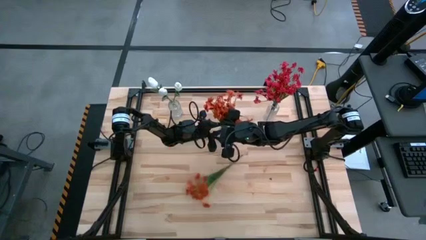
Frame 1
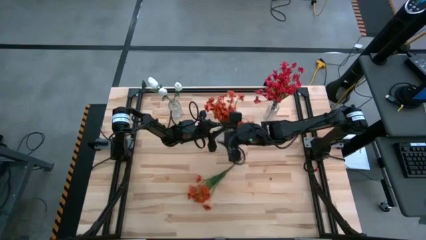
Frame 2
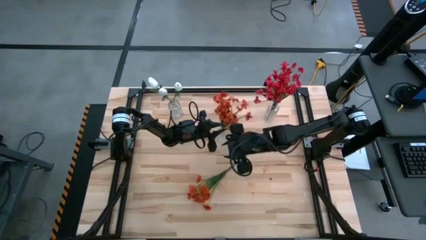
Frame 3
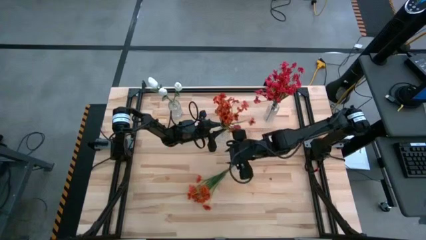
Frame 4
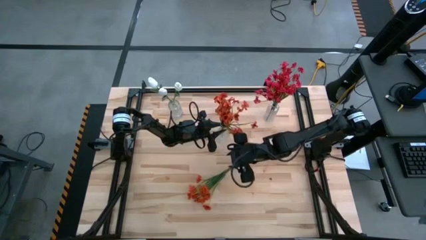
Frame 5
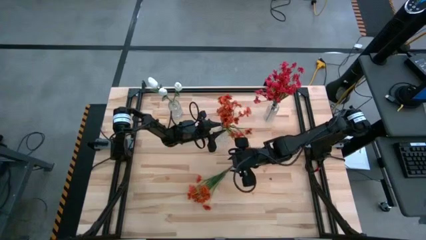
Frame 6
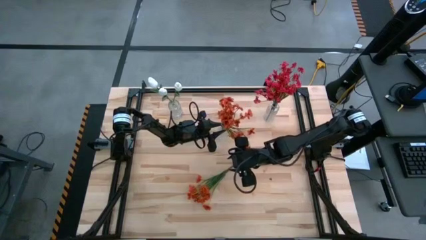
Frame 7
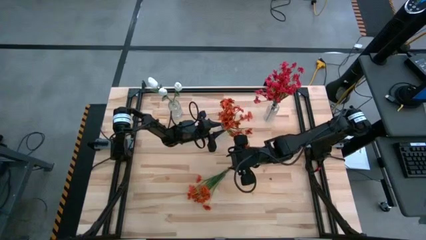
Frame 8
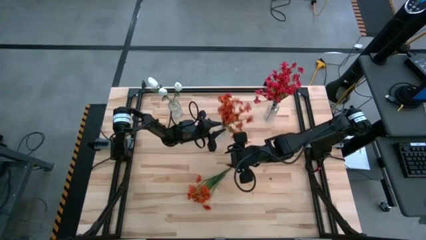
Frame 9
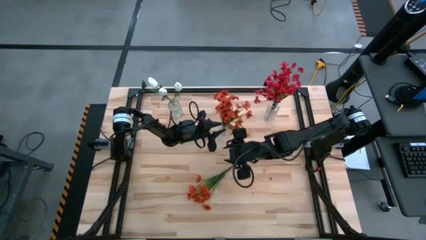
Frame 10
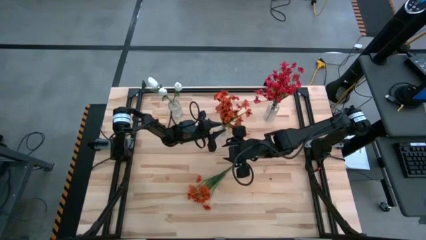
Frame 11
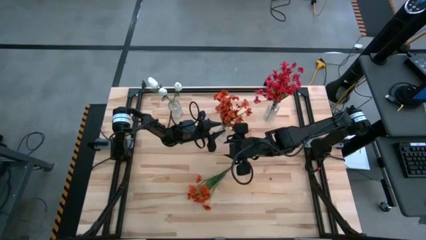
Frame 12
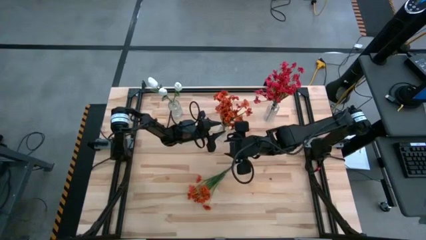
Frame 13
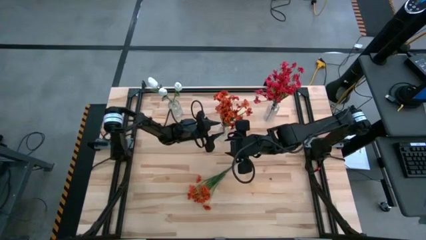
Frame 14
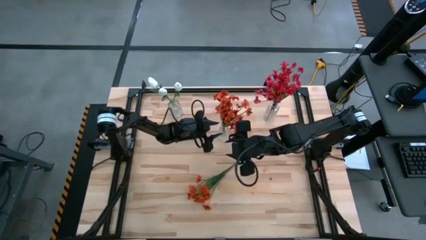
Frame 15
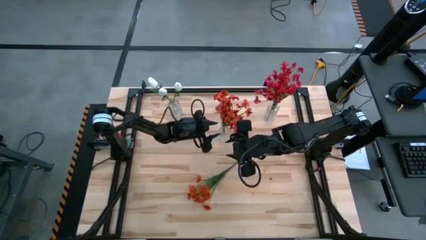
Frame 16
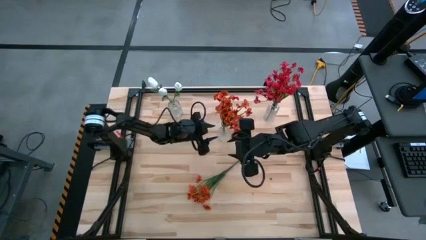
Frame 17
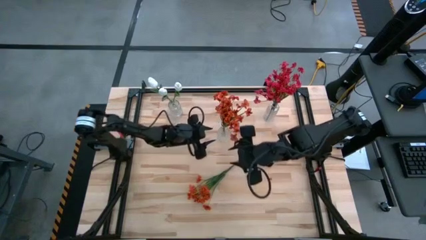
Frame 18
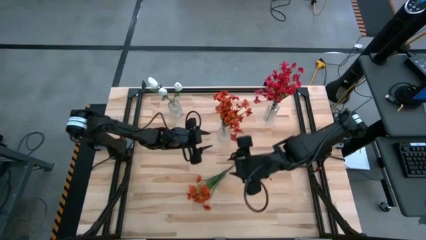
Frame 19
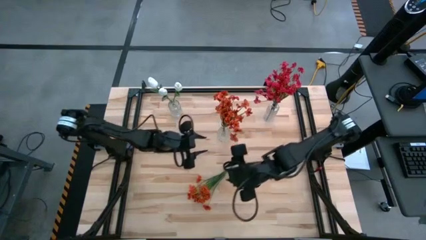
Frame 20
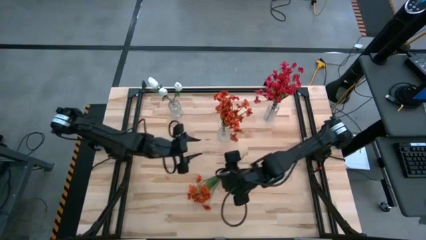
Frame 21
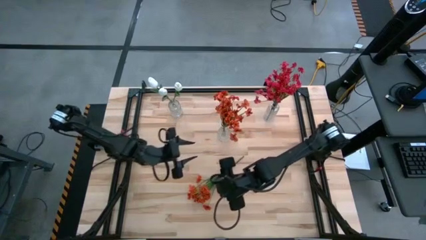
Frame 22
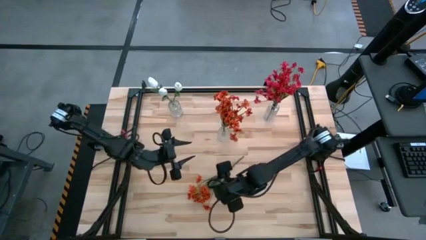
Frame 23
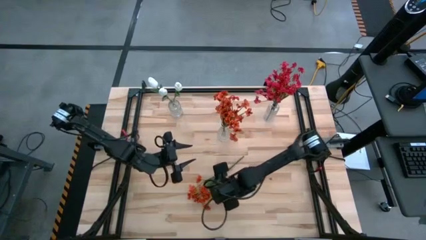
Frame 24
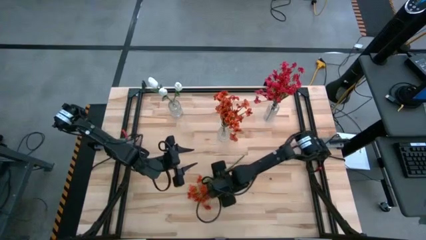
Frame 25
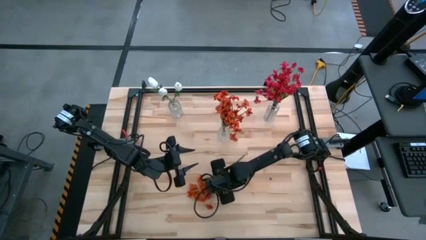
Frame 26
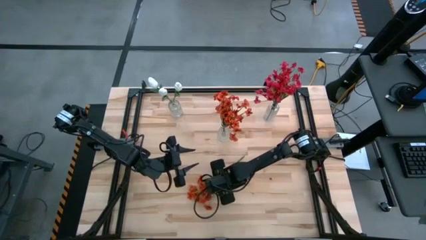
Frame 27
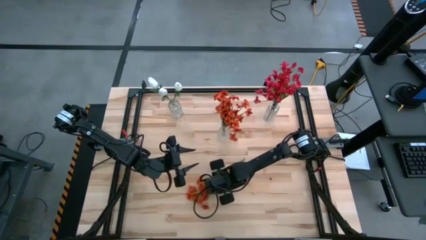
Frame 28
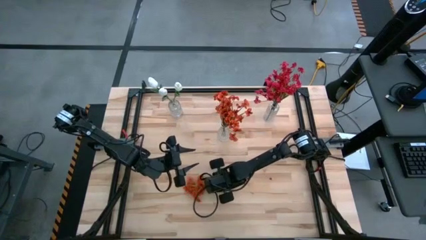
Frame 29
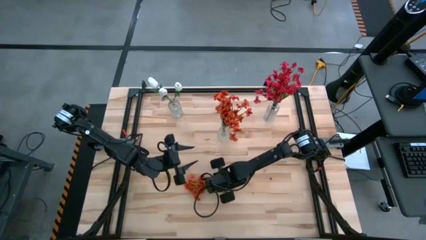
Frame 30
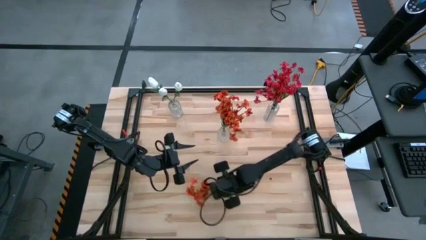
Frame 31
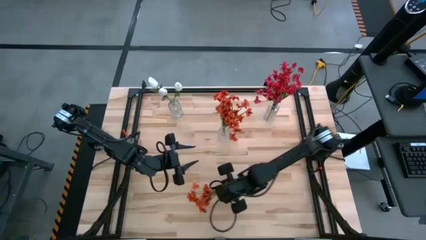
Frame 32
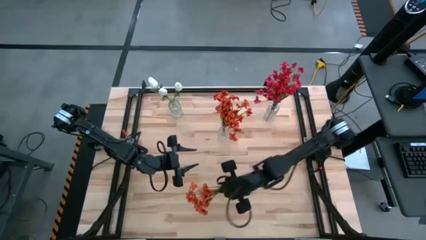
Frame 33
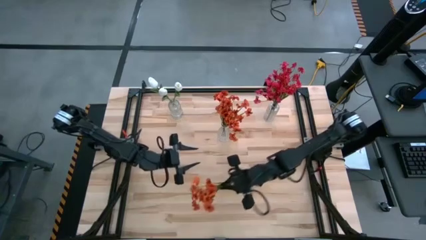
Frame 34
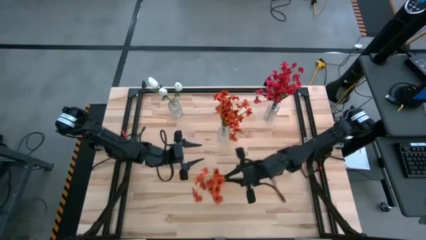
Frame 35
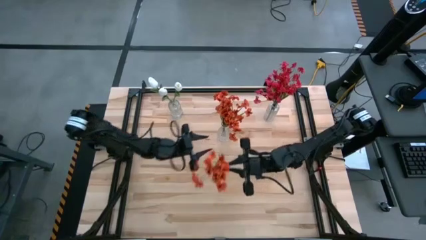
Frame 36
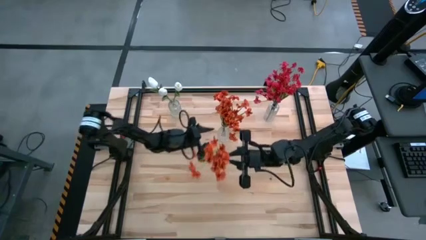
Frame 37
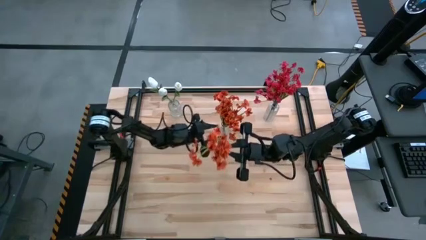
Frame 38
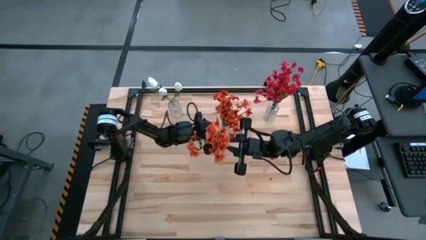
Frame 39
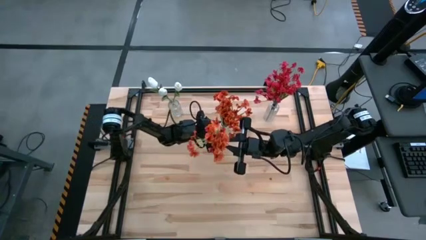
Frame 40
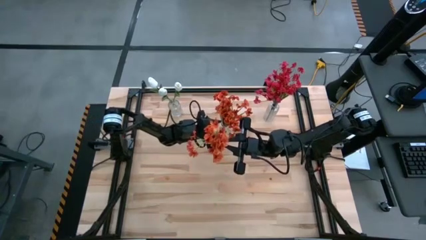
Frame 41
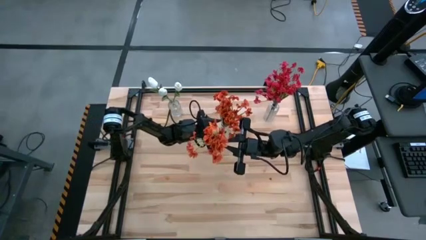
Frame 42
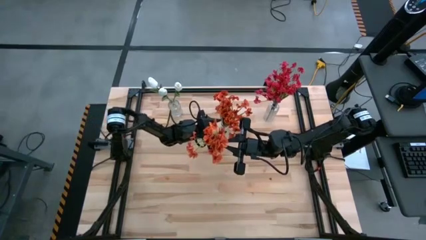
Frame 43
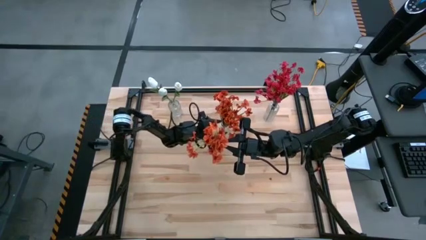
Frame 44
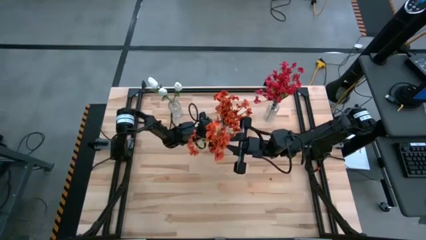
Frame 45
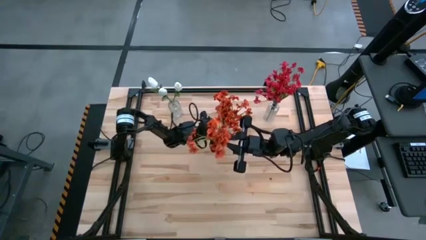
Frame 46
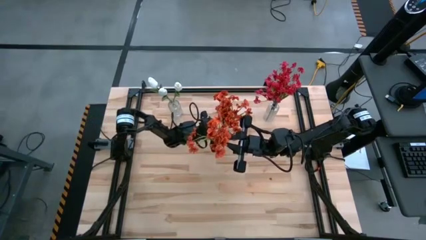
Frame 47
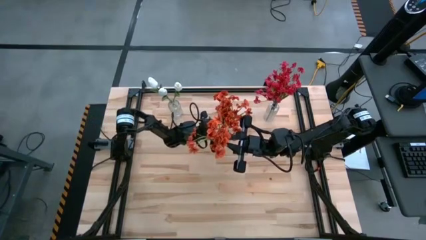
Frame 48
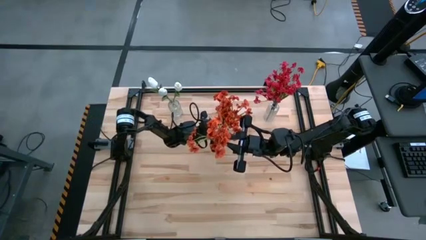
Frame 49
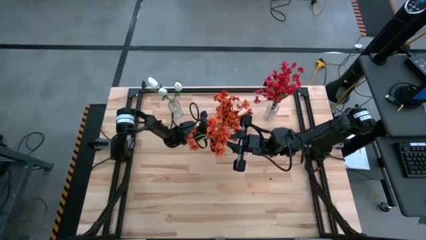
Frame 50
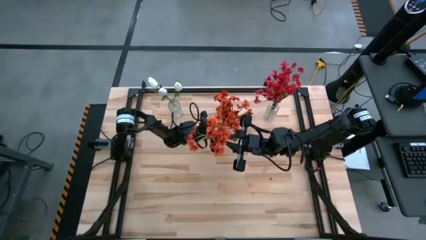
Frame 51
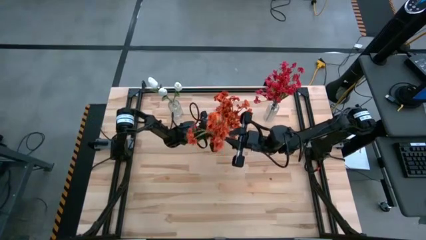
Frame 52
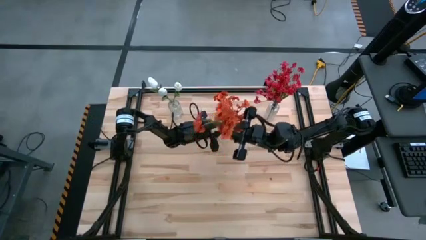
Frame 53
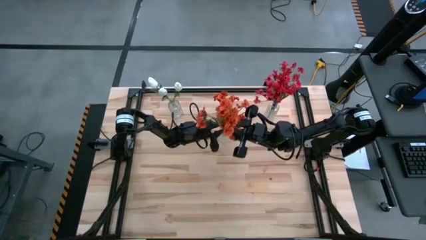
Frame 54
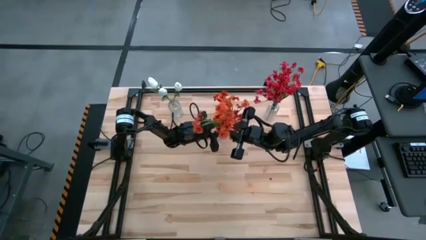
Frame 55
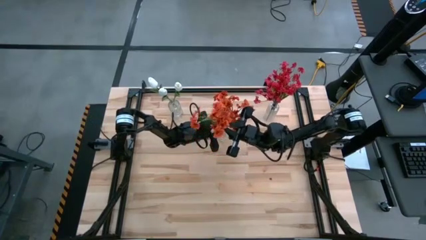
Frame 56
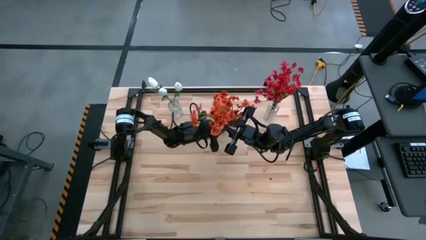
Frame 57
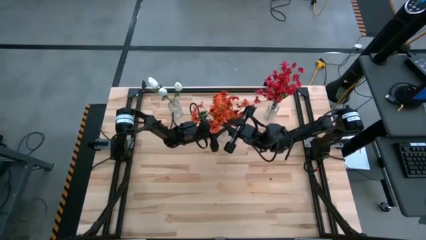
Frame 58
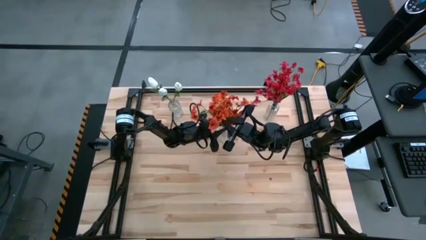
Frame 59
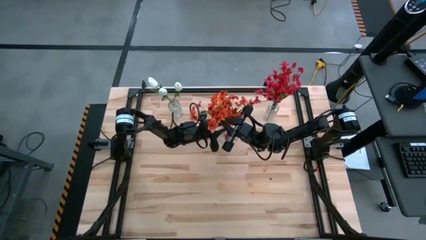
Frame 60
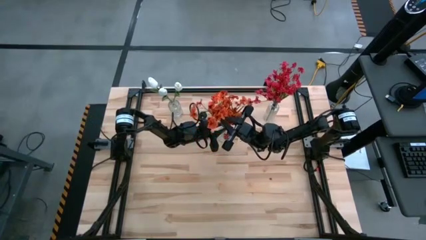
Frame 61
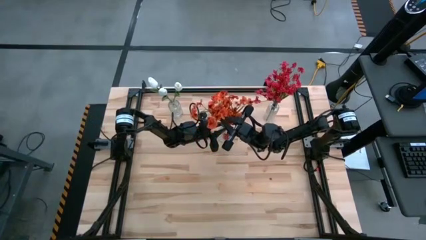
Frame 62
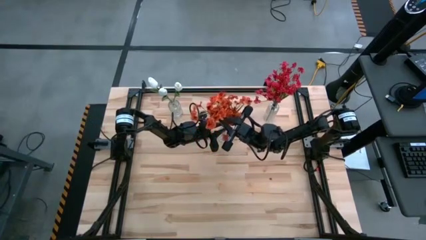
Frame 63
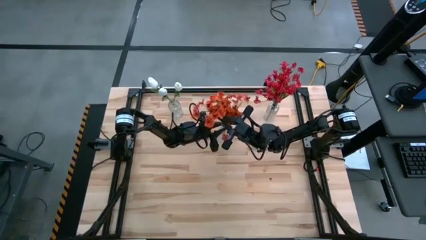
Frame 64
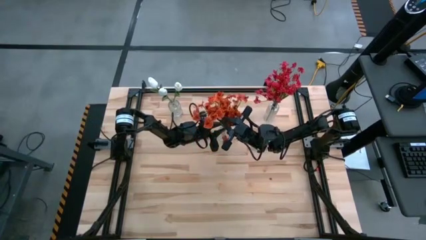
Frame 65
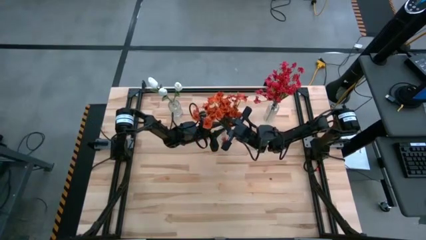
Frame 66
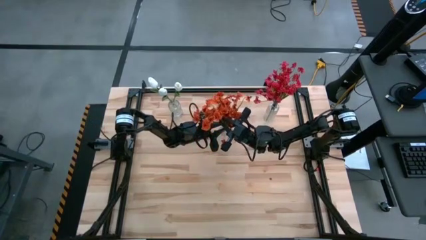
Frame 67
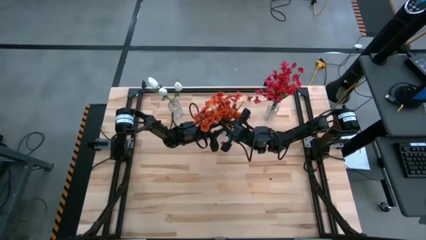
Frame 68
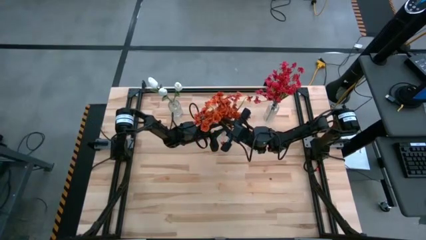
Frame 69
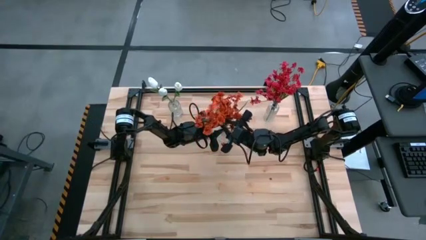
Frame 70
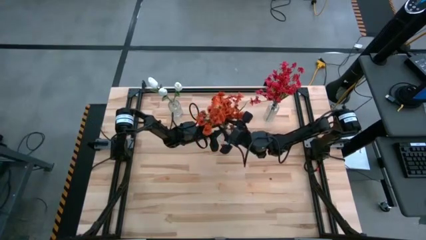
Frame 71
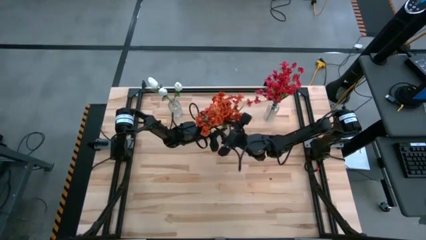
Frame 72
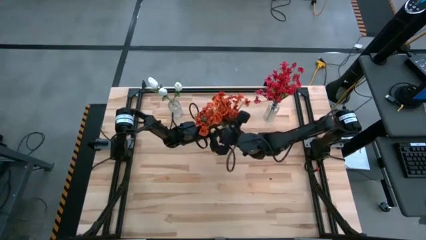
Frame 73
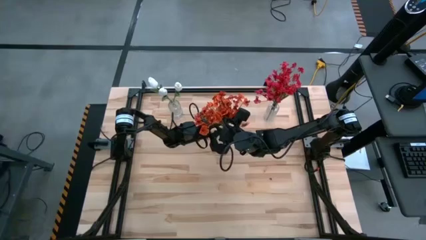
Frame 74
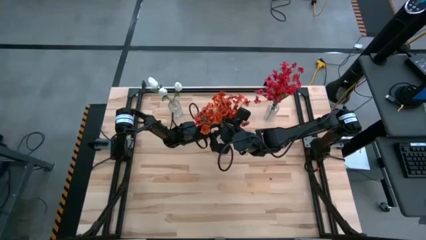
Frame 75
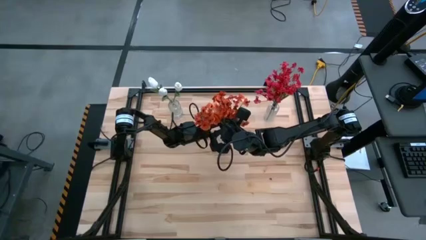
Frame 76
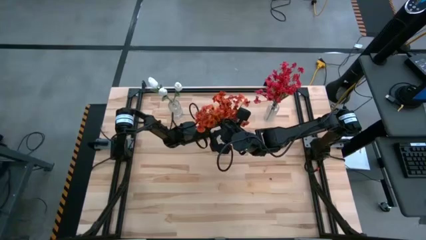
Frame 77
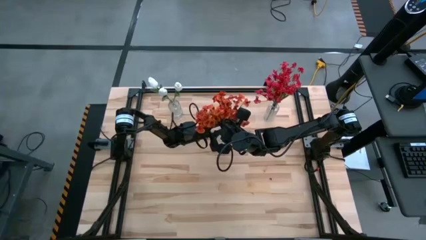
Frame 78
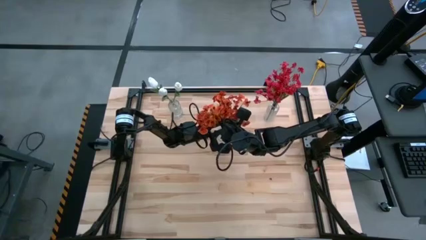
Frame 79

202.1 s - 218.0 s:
Task: Sort flowers into vase by color
Put the orange flowers into the bottom transparent vase

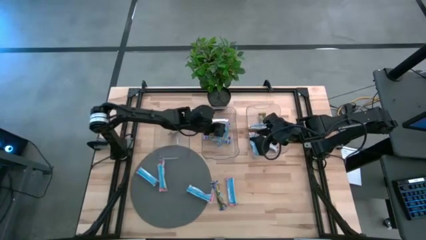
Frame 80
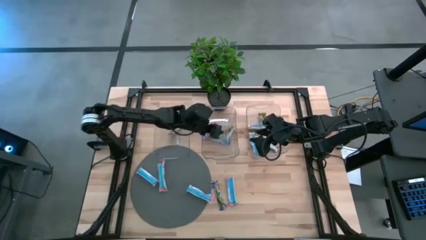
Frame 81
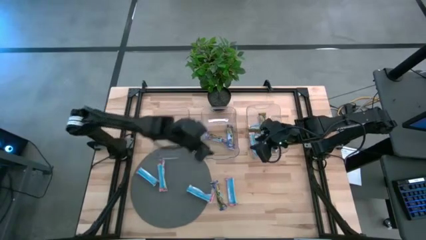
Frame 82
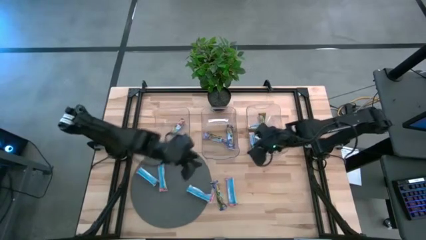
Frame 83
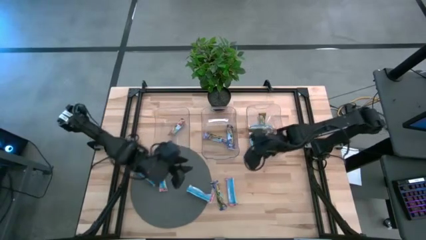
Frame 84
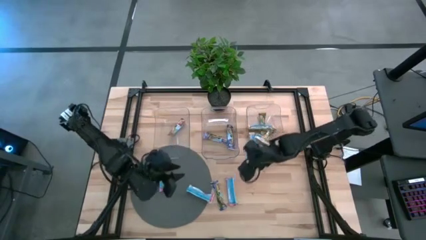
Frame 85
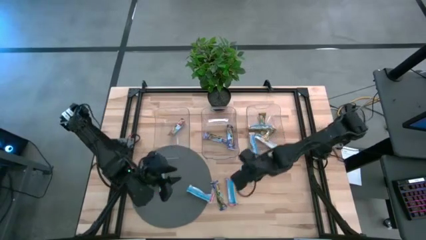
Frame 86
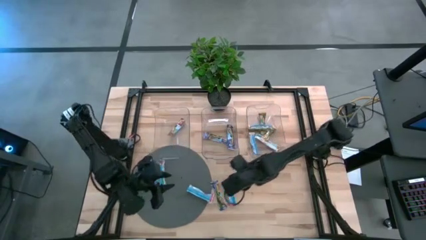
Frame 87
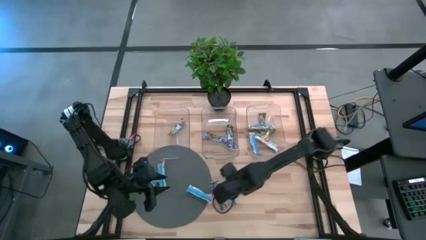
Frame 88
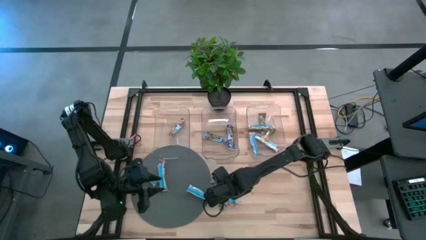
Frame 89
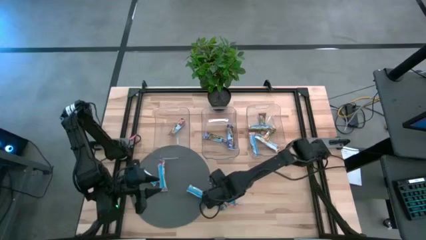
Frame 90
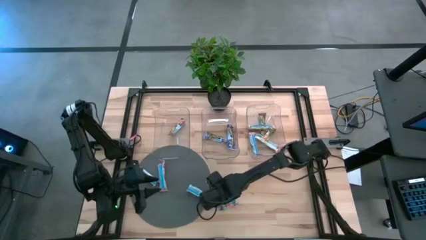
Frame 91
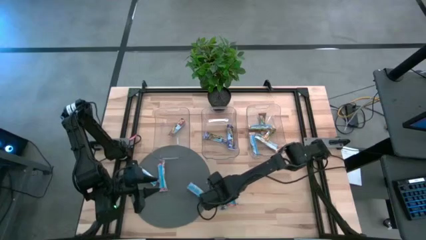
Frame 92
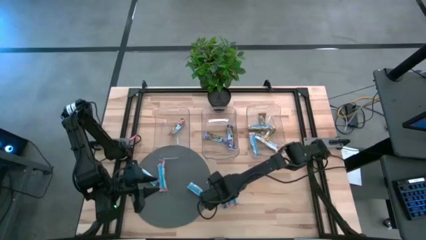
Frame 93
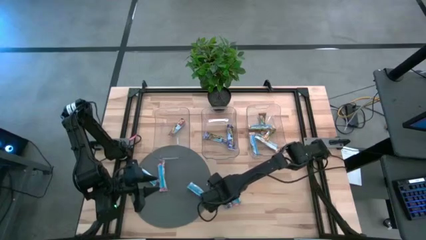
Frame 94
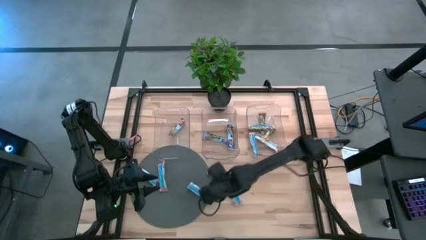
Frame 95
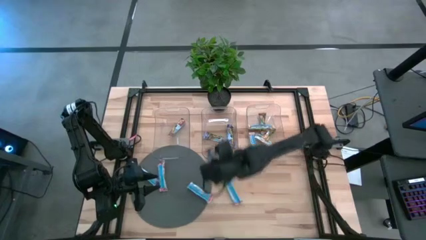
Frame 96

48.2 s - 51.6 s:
Task: Pick and place Granola Bars by type
Put the blue granola bar into the middle transparent bin
